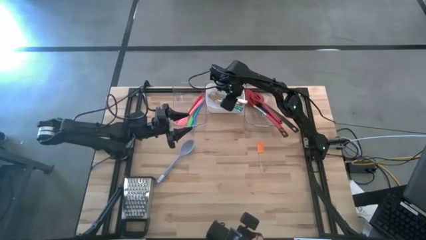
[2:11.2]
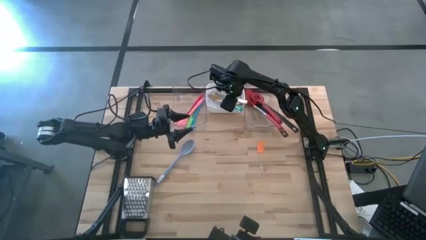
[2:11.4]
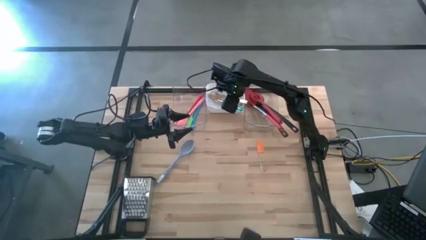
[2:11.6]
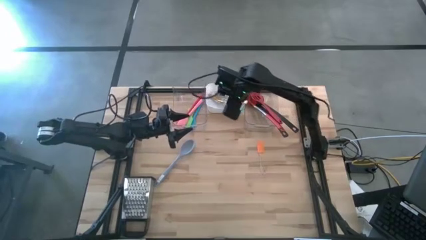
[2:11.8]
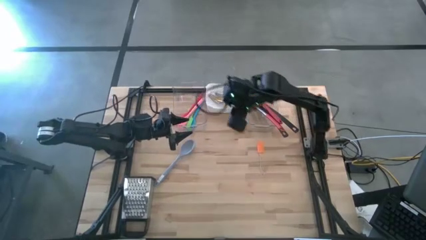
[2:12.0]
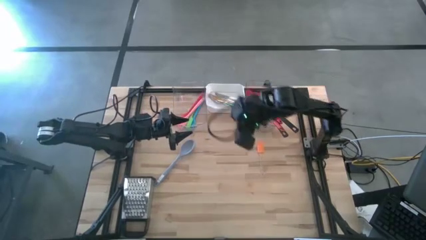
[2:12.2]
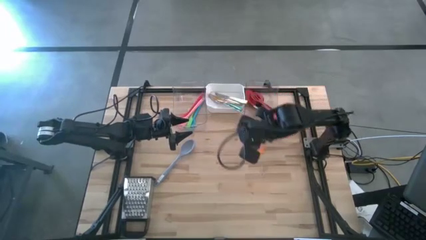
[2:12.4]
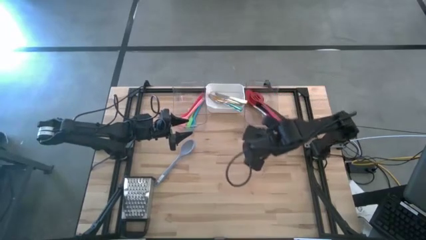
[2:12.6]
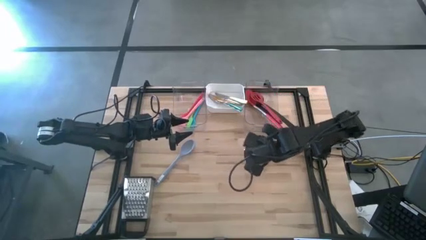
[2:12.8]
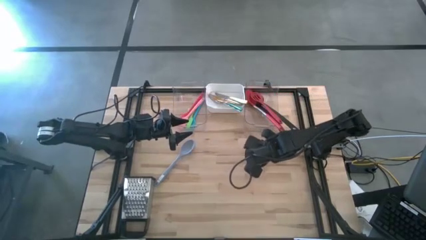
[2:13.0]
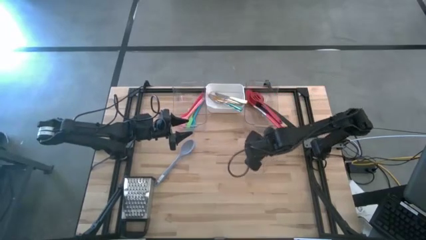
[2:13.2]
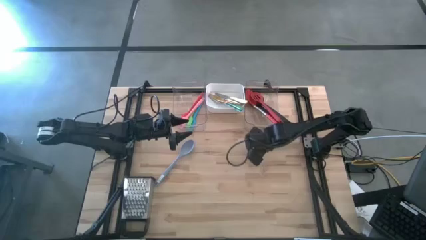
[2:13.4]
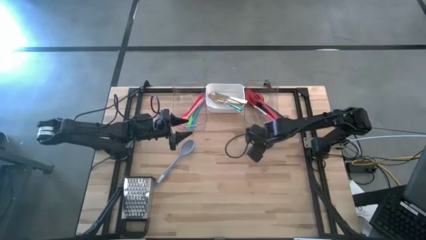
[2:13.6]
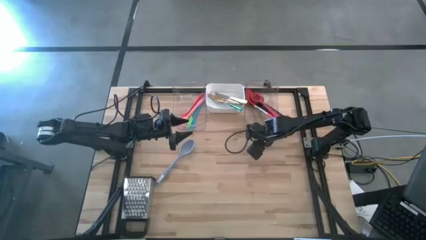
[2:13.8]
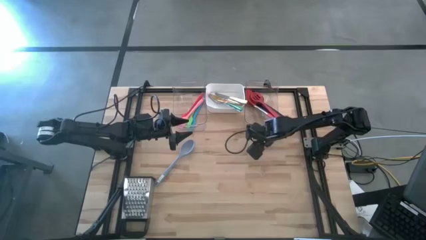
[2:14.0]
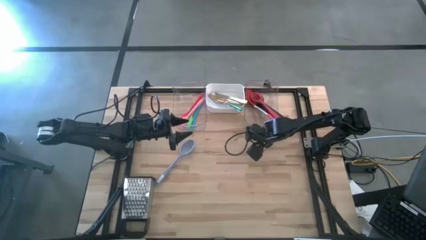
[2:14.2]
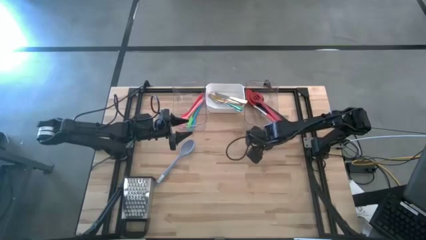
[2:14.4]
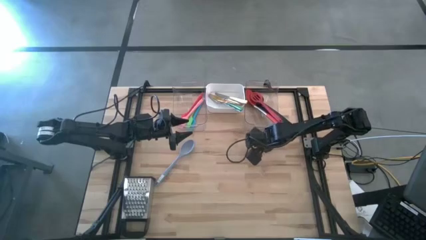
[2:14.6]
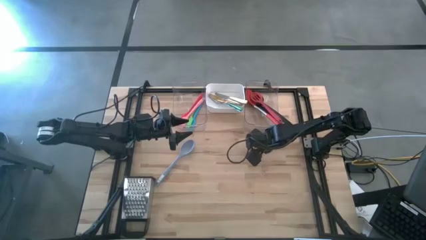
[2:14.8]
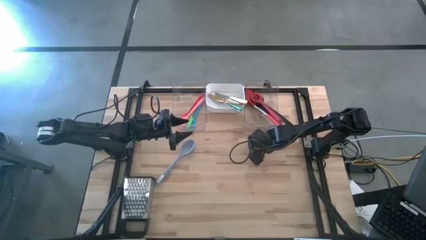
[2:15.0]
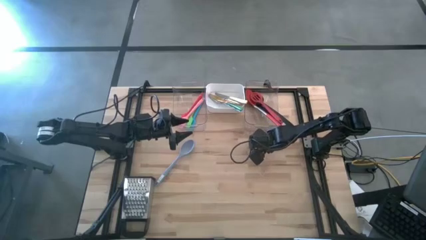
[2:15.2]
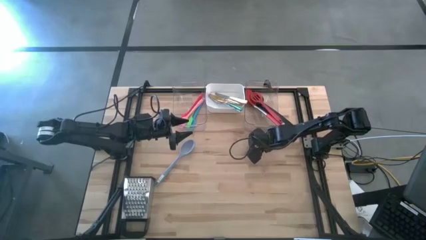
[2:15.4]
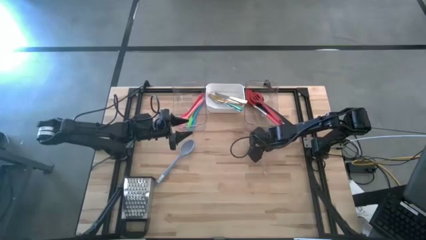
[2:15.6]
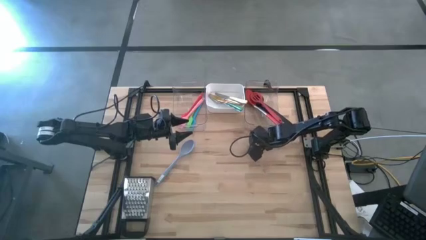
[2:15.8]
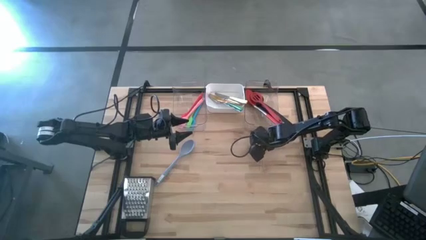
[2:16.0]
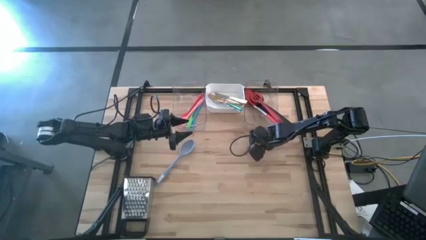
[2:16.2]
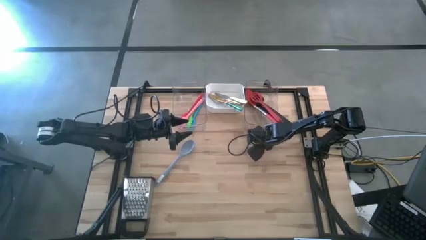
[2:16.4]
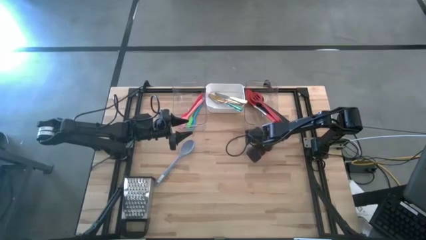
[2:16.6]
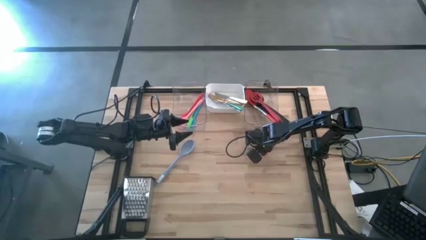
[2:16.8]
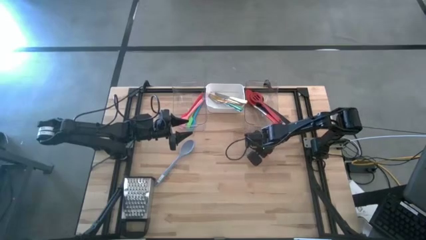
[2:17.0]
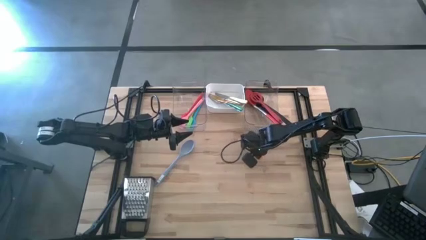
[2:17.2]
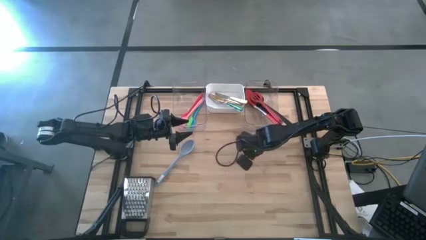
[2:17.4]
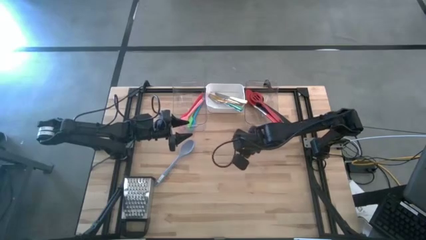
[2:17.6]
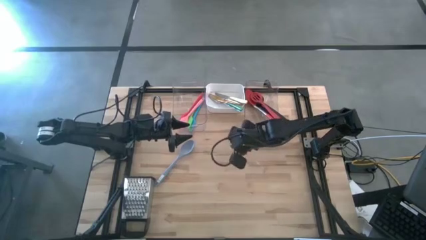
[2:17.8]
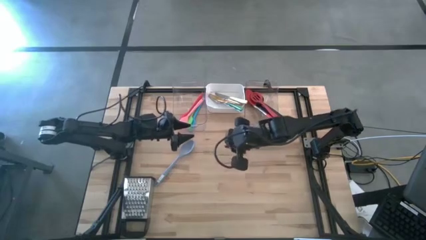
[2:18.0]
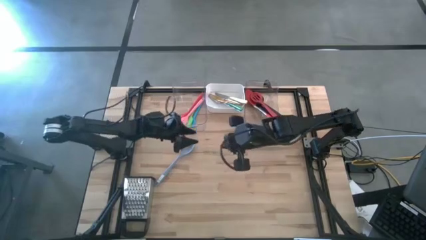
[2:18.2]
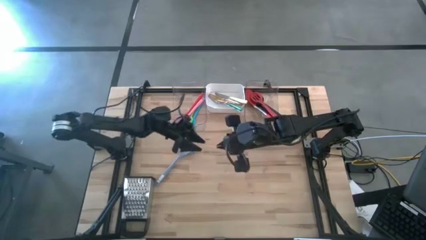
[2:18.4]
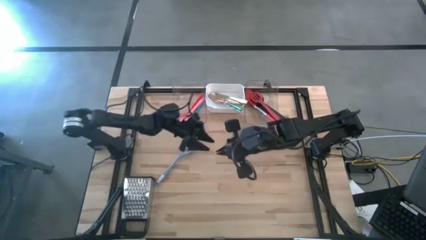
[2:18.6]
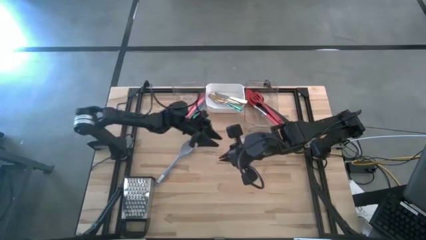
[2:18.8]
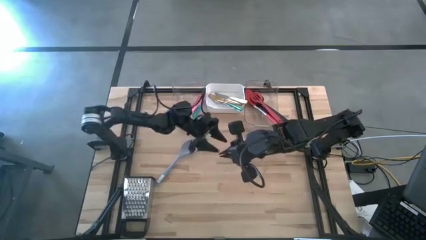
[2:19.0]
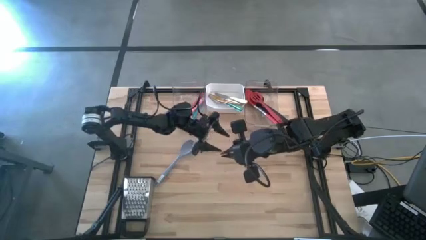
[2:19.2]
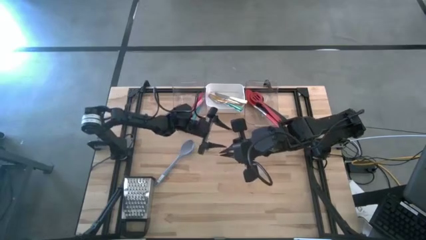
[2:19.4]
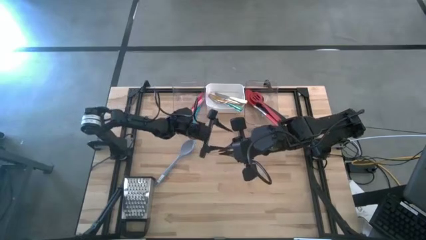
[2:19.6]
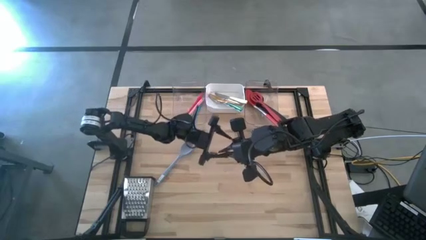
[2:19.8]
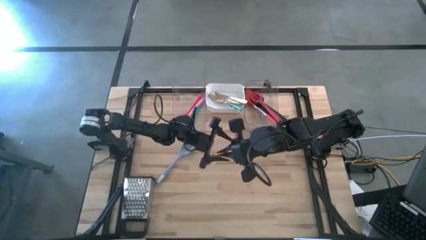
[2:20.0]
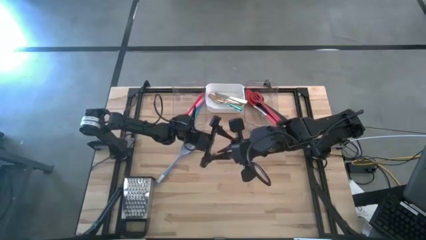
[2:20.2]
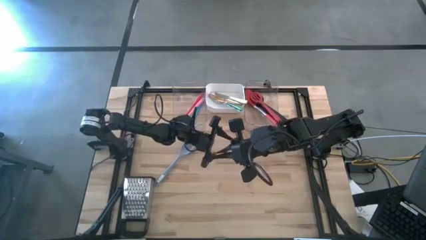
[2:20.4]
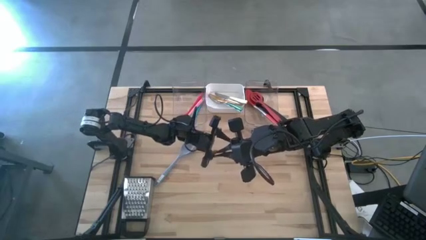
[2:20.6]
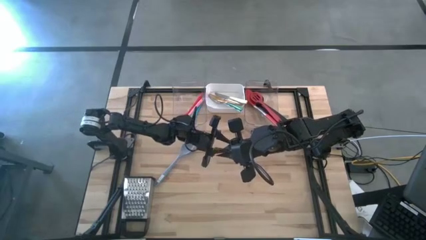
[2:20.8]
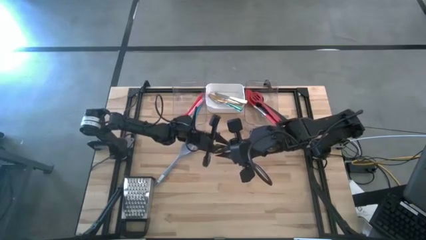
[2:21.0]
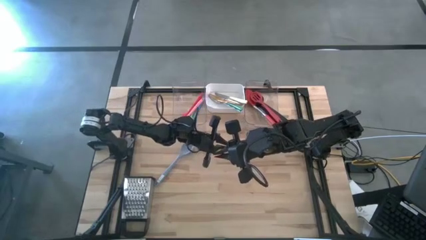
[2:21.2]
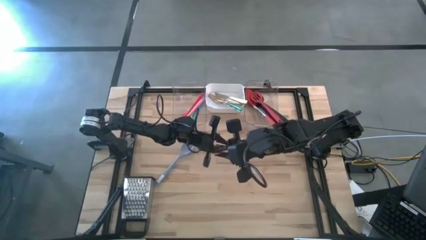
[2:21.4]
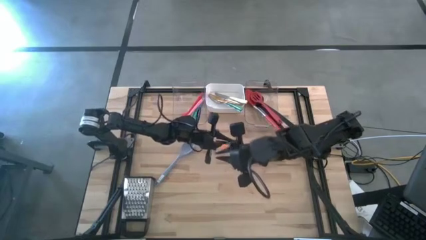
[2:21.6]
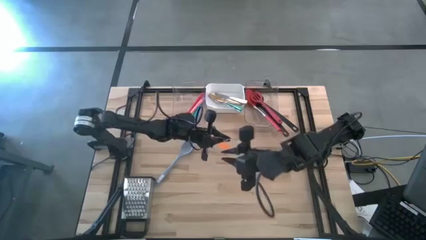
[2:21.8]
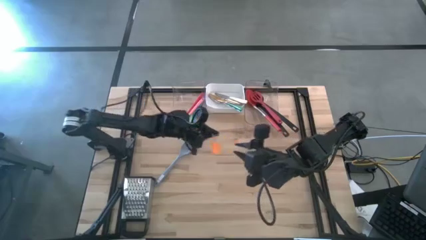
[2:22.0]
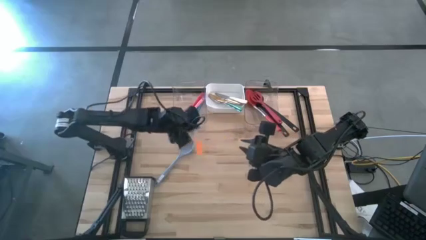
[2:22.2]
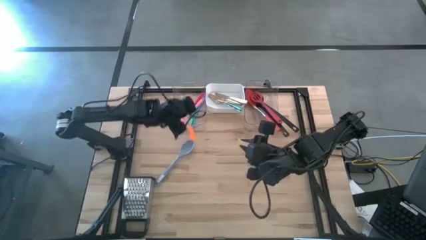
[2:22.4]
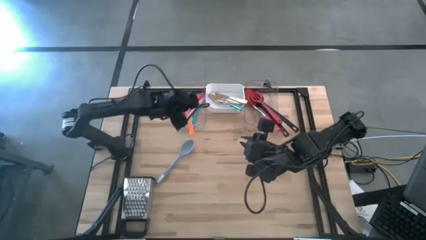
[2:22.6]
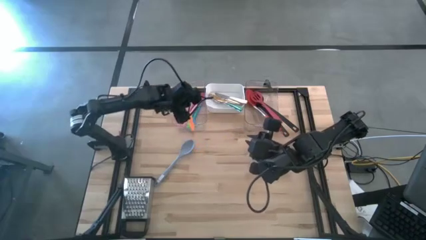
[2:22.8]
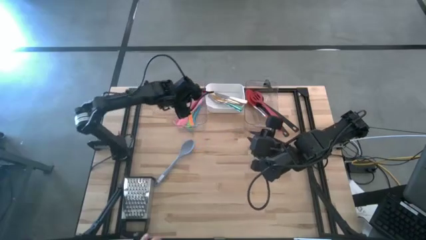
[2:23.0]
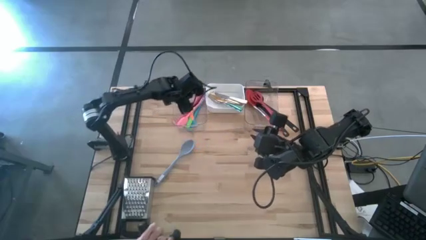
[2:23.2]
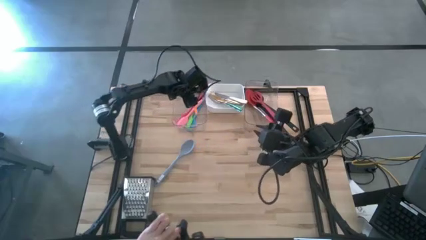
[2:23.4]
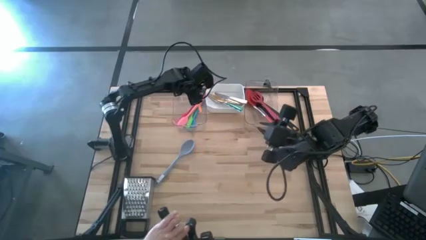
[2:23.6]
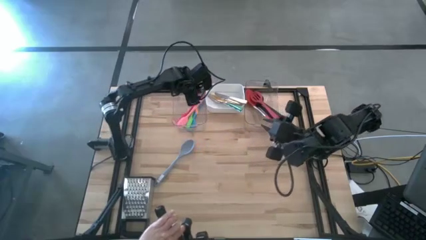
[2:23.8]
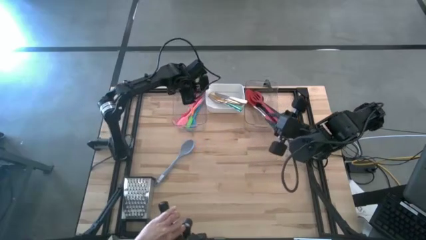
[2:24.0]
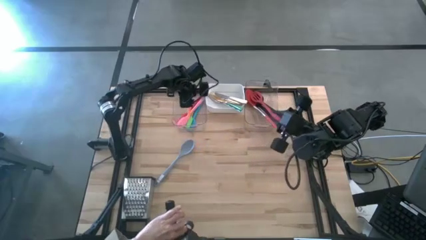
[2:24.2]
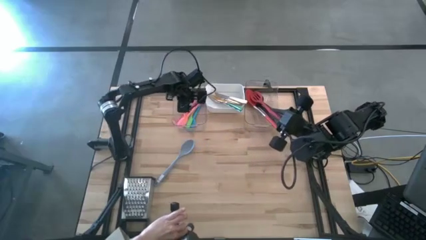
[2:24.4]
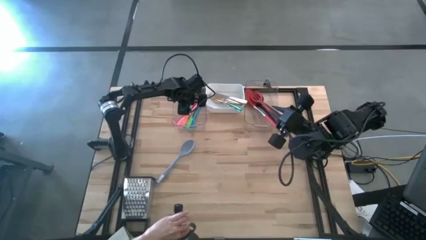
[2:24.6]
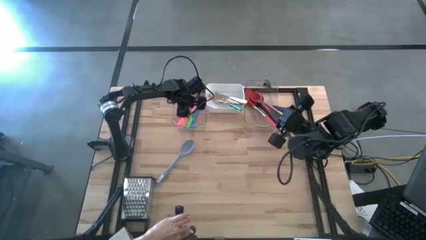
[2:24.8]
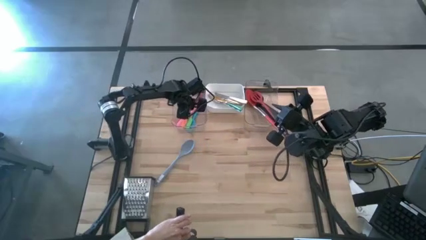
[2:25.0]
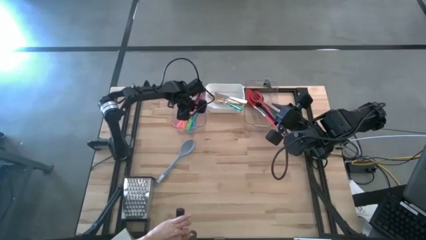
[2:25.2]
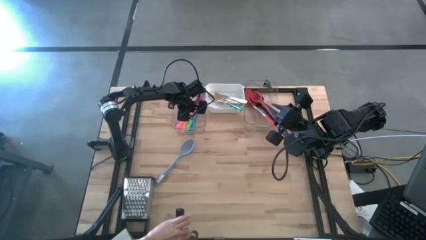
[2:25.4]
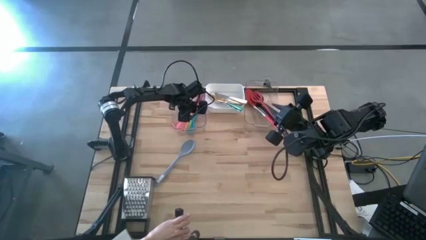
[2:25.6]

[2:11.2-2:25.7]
Task: Pick & Place Kitchen Items
Put the transparent spatula into the left transparent bin
